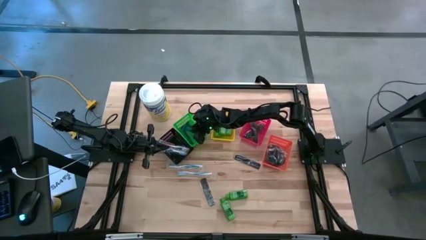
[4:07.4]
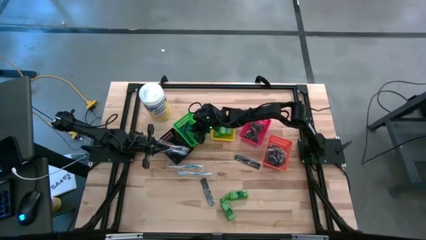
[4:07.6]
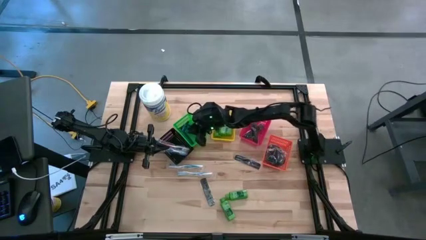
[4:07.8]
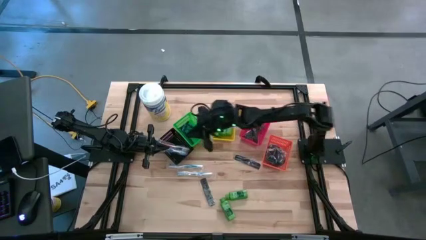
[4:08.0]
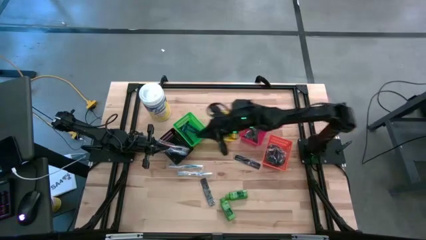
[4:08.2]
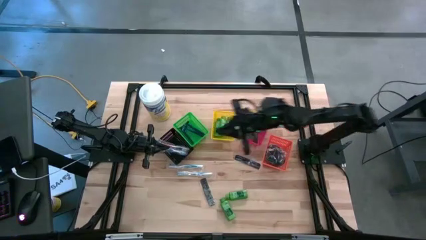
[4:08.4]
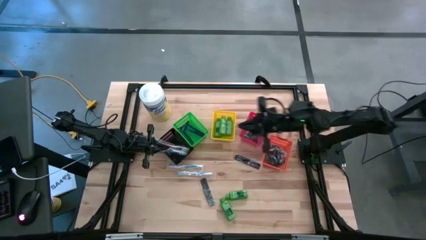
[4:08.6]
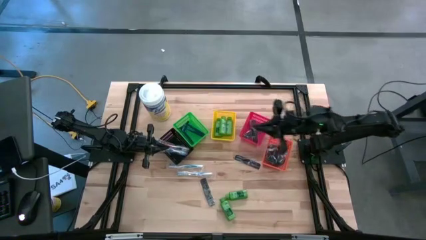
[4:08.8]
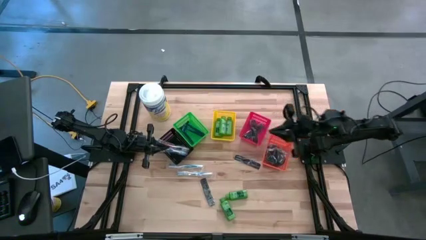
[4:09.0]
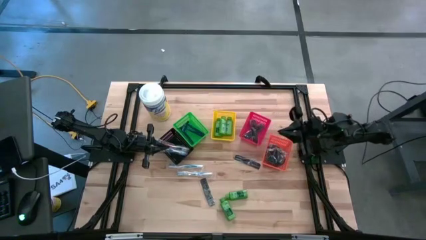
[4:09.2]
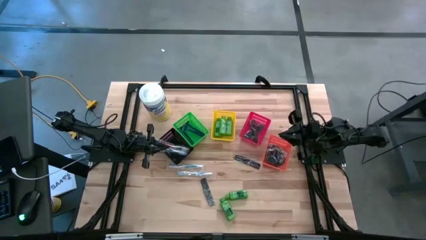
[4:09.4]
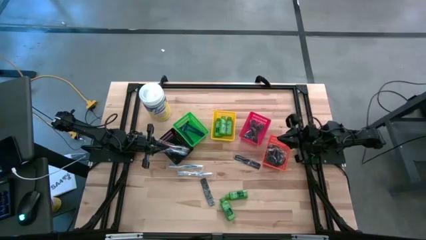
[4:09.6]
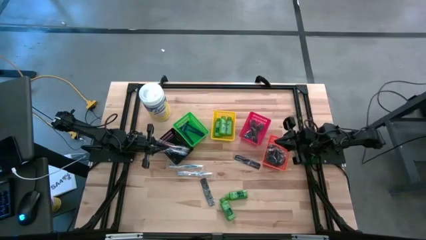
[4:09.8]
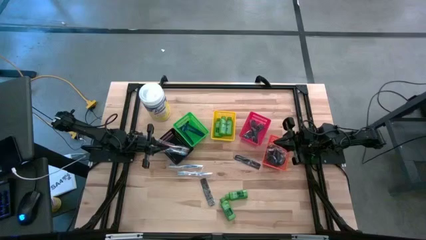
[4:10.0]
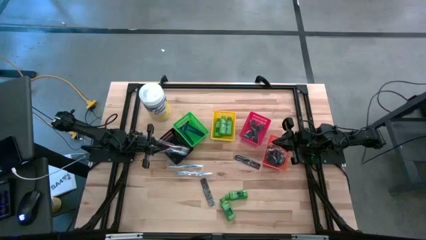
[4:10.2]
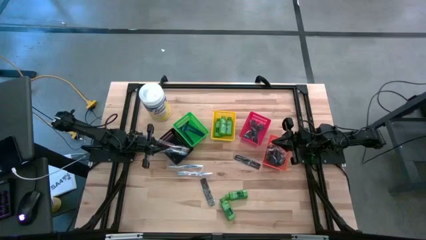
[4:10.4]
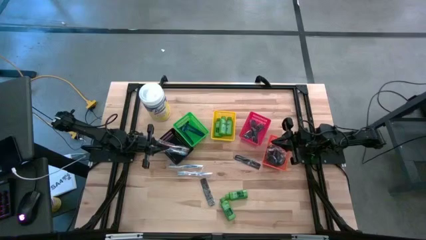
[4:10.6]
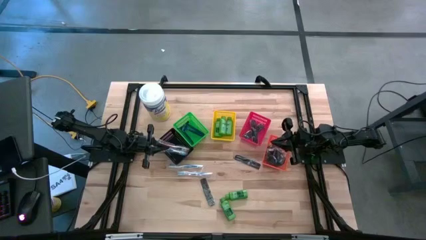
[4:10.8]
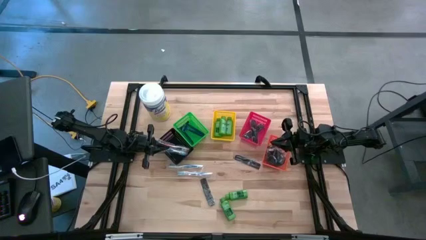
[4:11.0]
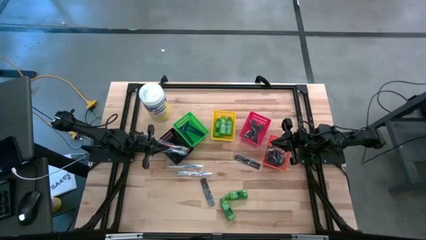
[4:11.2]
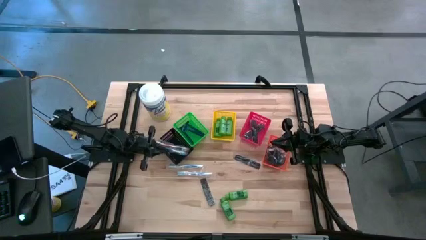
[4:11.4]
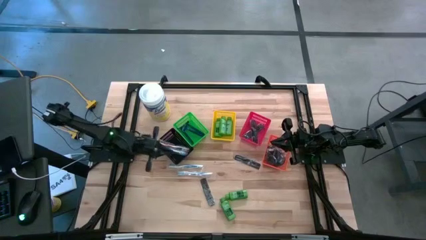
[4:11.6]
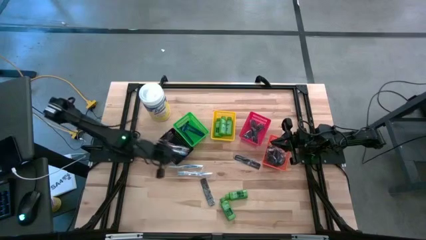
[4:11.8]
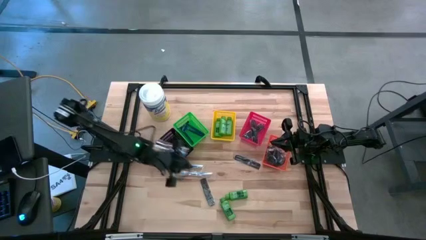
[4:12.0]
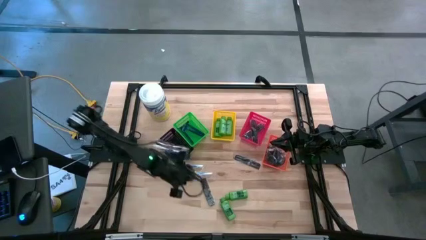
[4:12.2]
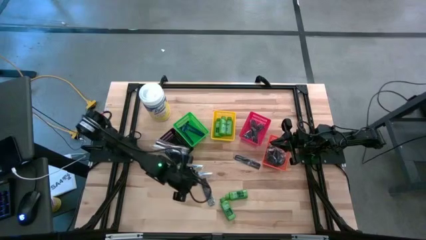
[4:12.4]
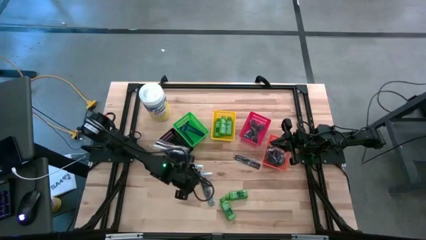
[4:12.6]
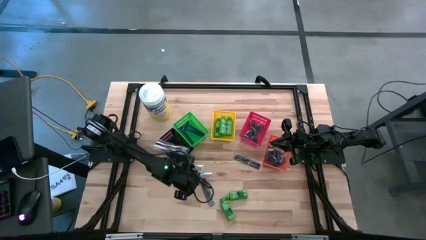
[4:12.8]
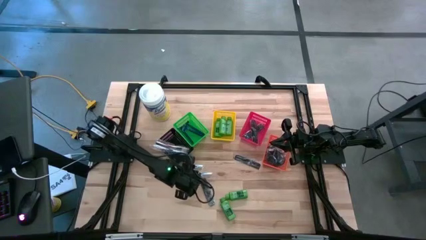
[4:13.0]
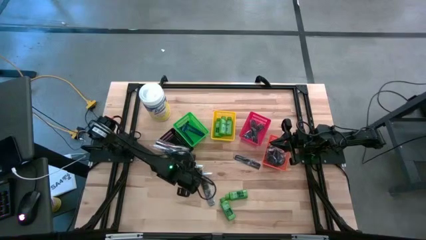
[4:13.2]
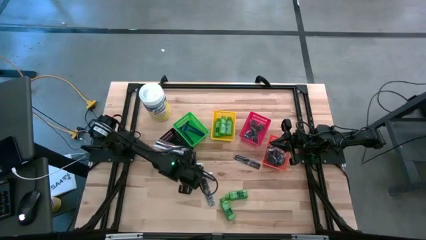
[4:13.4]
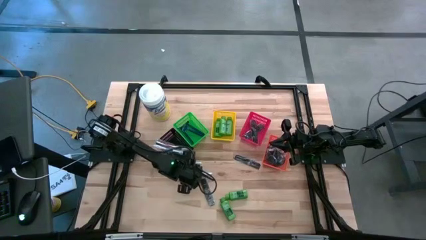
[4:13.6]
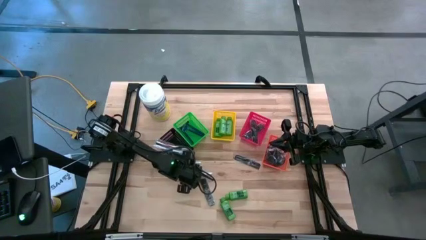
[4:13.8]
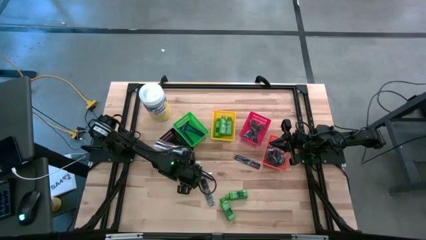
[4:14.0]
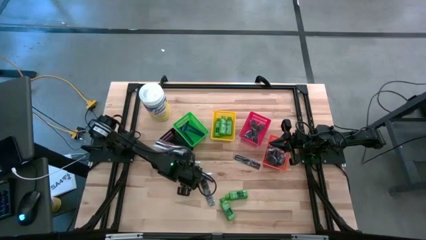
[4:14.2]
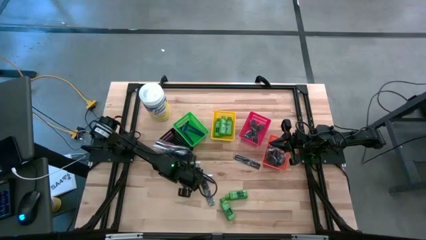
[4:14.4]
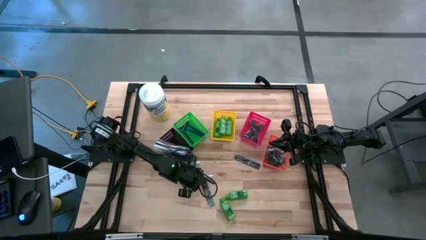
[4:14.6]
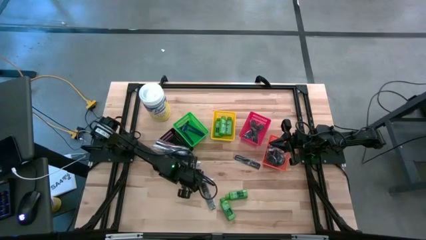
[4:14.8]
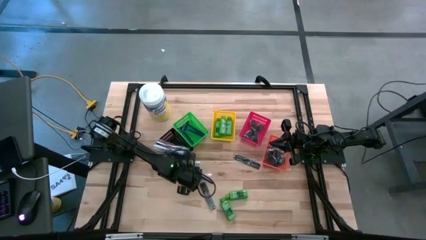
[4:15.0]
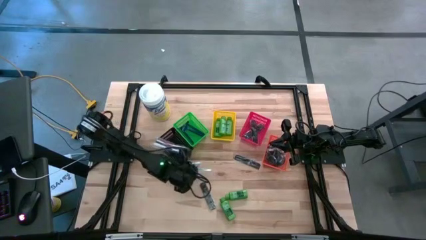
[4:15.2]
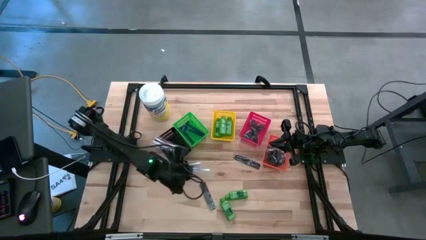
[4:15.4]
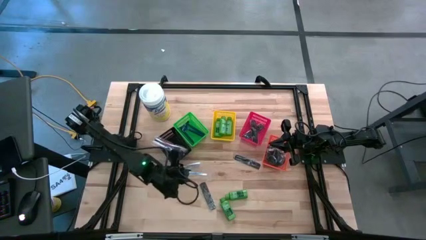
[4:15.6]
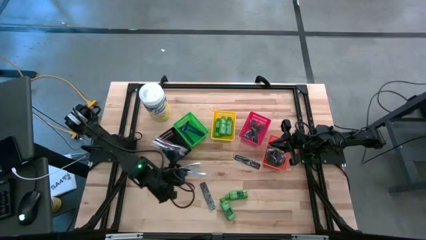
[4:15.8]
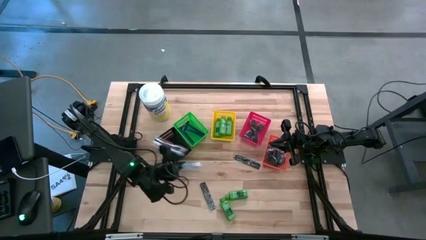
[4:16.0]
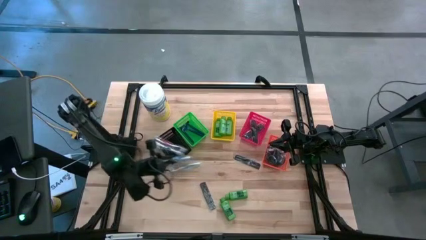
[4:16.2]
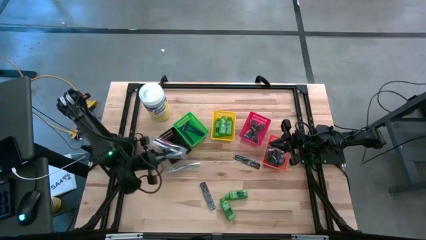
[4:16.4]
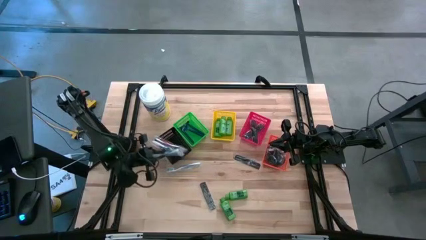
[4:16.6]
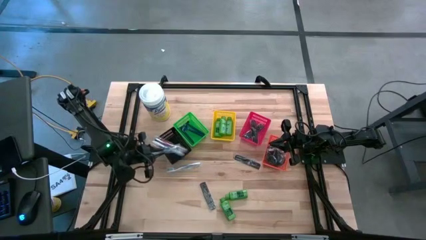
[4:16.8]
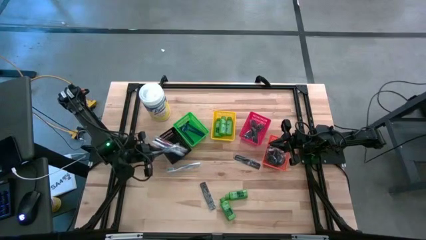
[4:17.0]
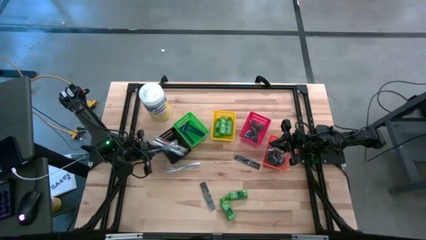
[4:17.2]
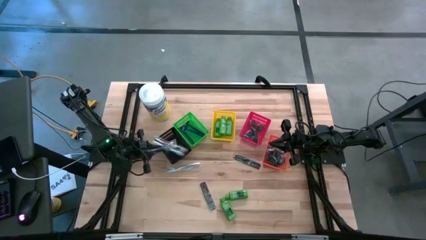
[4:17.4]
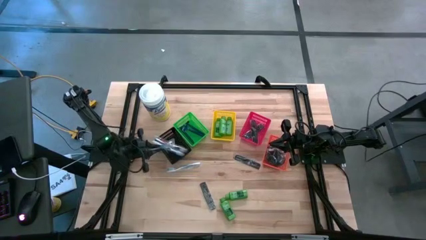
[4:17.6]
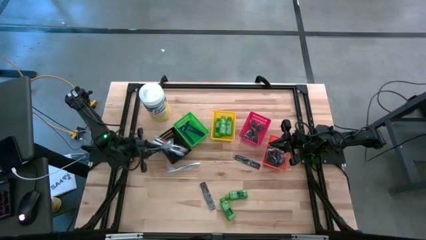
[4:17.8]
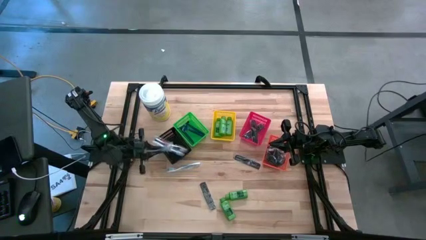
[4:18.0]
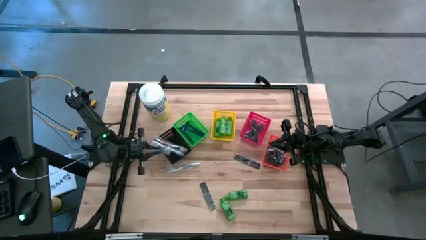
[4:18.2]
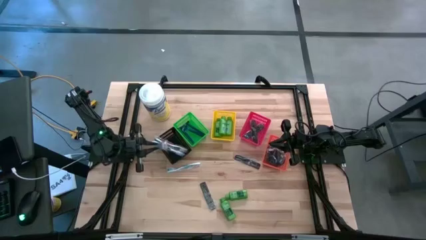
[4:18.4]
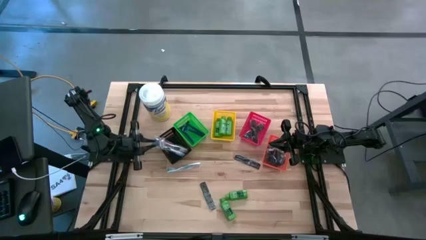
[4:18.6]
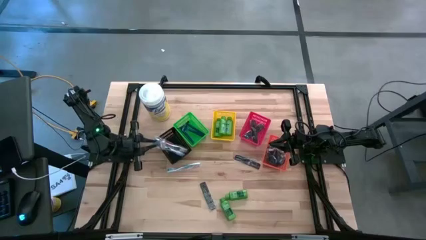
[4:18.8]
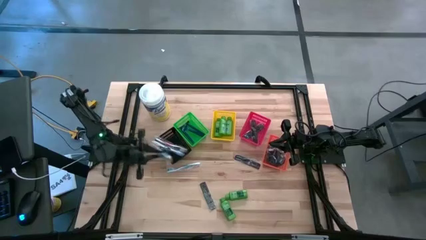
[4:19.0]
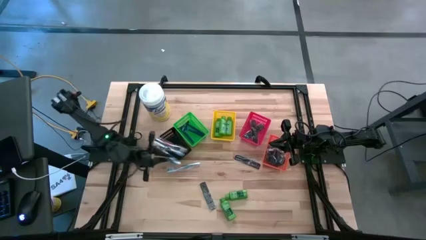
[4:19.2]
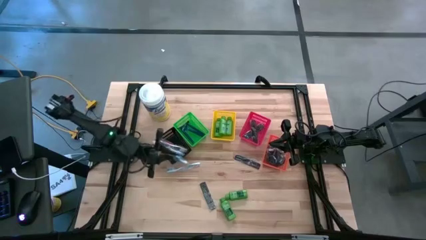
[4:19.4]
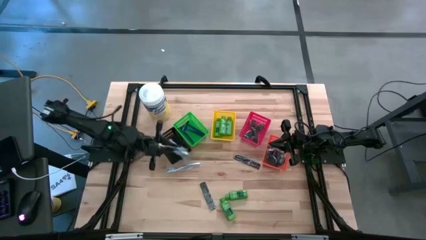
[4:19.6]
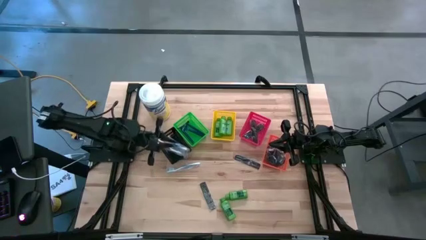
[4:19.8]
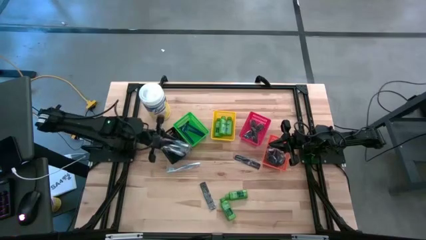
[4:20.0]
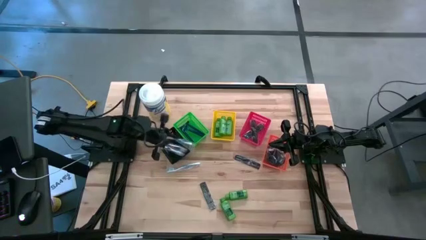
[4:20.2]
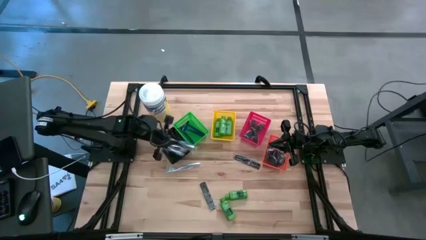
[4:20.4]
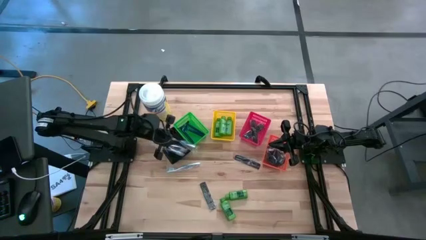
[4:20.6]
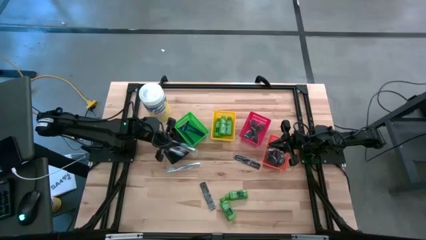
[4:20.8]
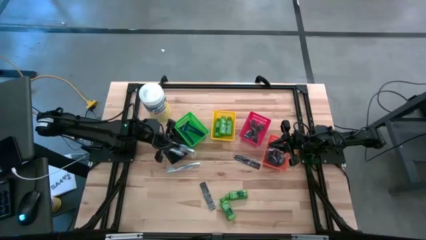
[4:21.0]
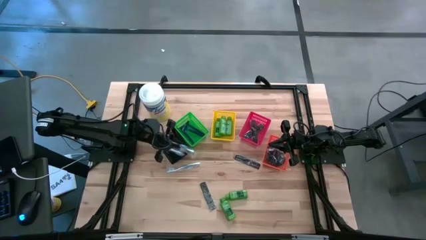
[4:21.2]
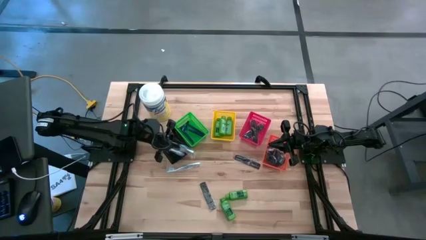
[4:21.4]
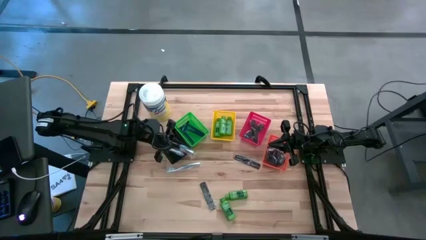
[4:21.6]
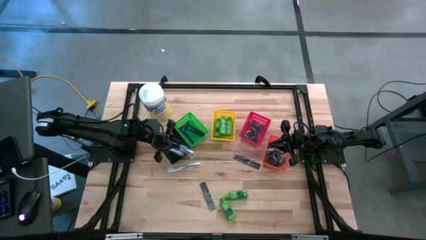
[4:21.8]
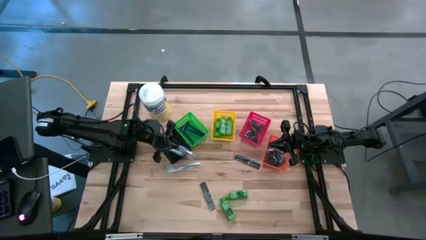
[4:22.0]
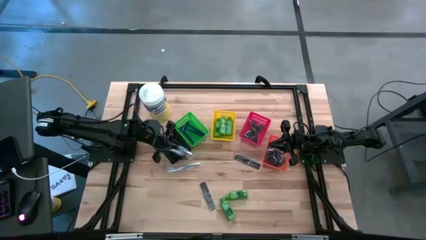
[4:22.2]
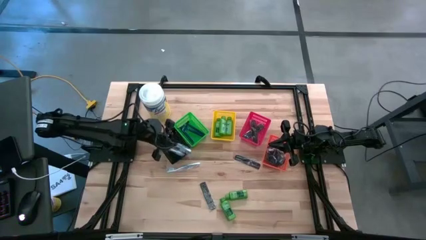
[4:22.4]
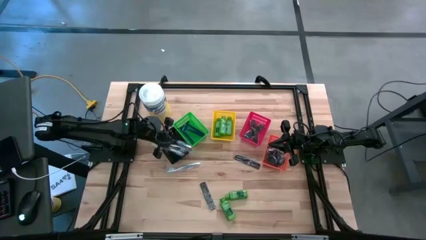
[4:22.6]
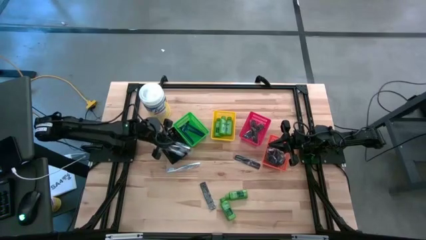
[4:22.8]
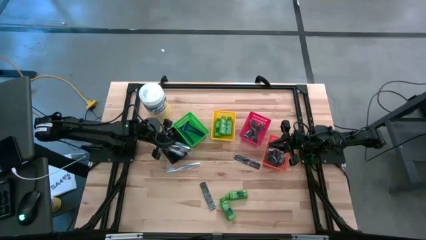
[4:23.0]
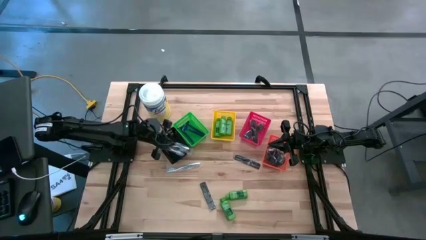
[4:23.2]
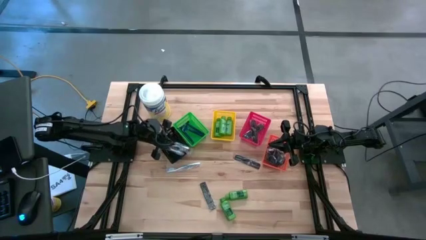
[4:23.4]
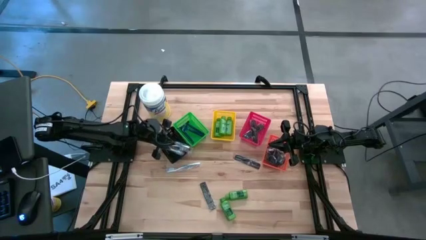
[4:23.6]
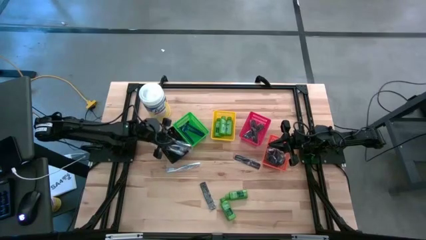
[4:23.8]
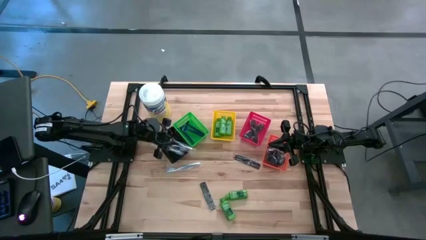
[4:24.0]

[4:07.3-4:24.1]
Task: Pick & Place Travel size toiletries
Put the bottom blue toothbrush into the black bin
